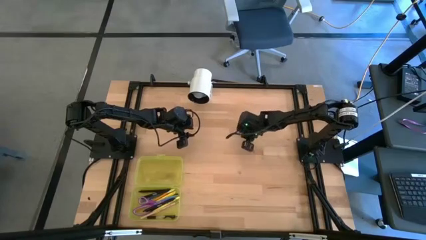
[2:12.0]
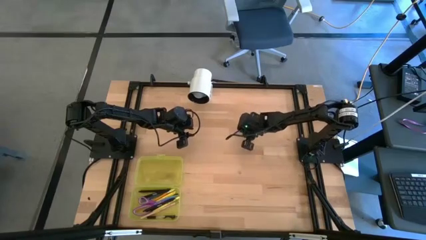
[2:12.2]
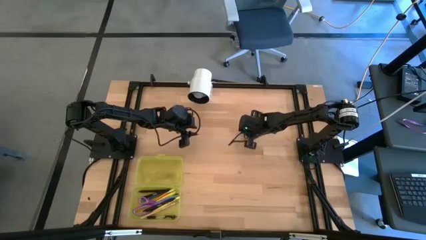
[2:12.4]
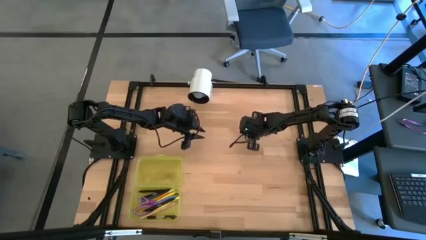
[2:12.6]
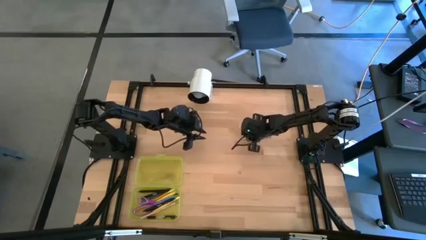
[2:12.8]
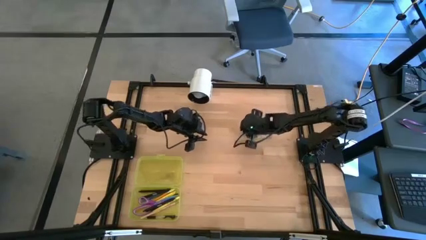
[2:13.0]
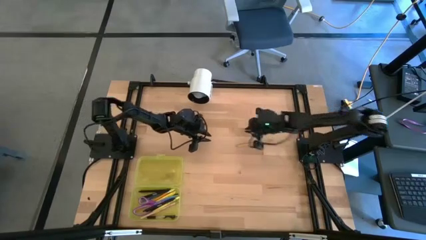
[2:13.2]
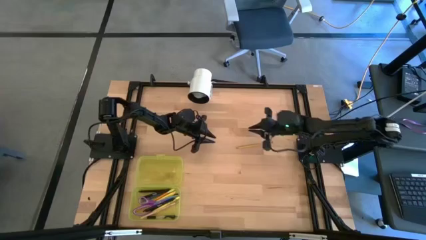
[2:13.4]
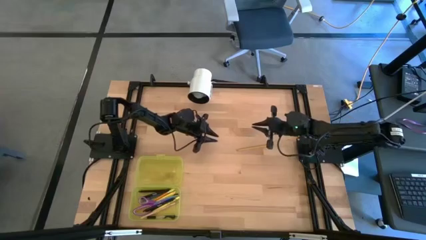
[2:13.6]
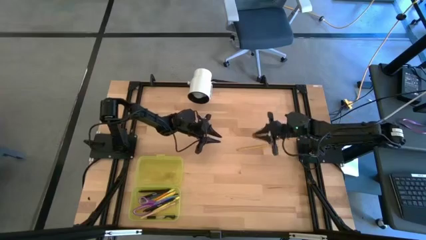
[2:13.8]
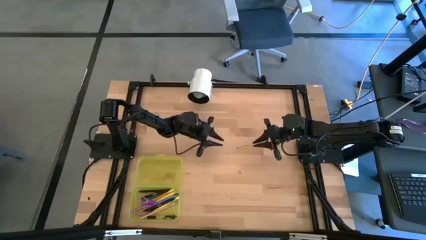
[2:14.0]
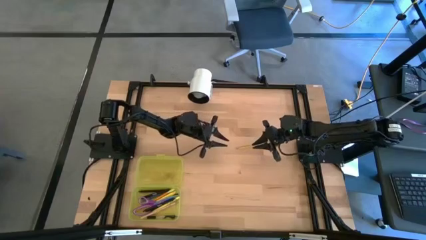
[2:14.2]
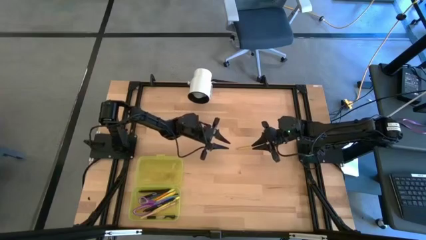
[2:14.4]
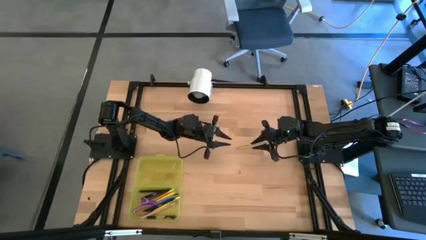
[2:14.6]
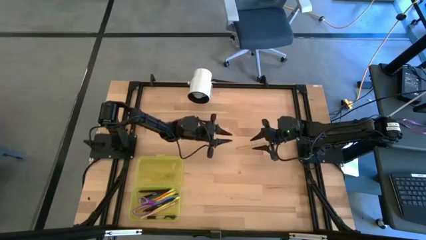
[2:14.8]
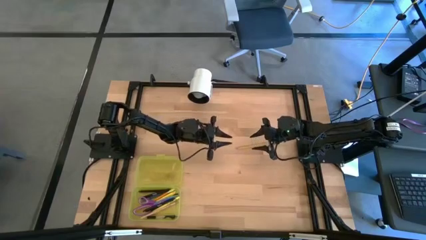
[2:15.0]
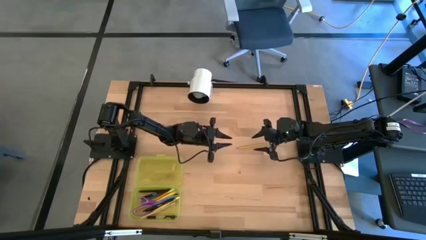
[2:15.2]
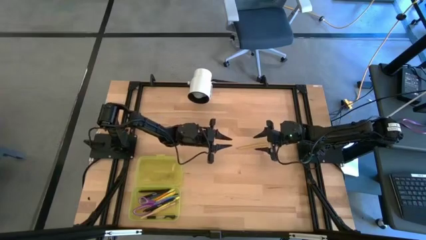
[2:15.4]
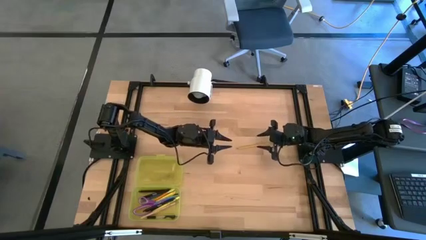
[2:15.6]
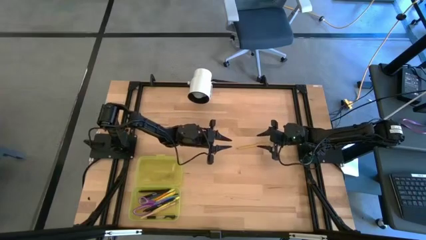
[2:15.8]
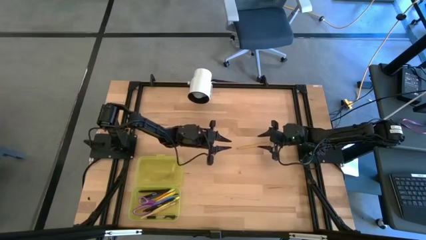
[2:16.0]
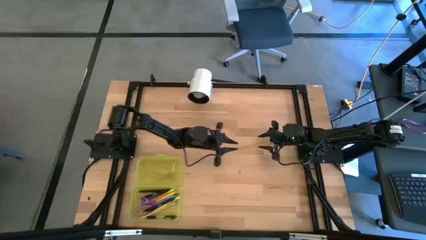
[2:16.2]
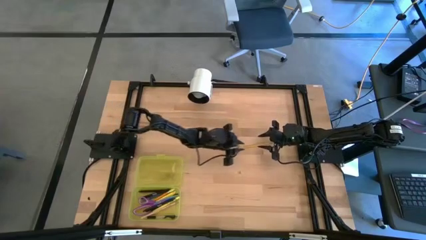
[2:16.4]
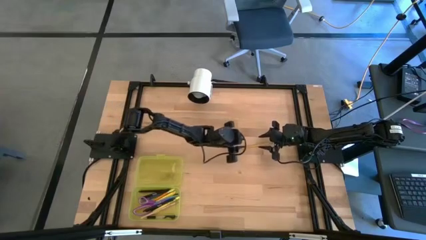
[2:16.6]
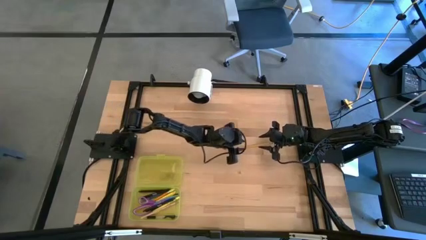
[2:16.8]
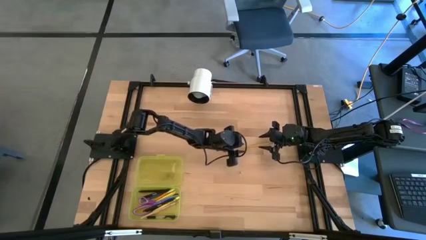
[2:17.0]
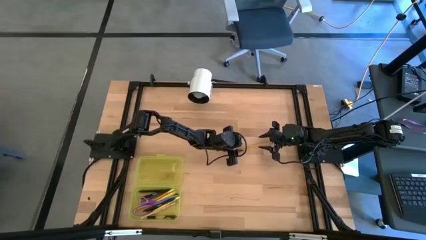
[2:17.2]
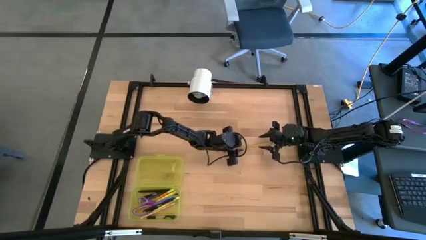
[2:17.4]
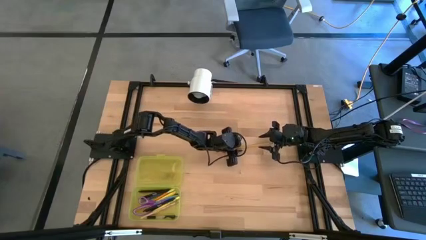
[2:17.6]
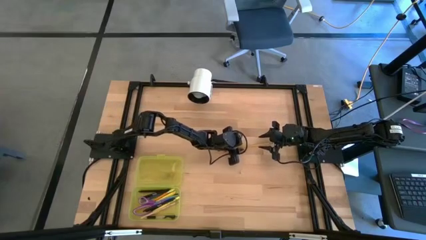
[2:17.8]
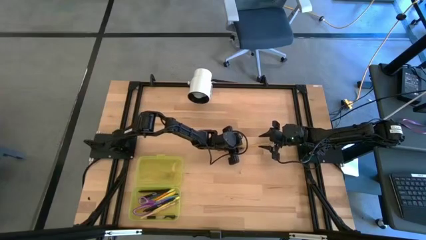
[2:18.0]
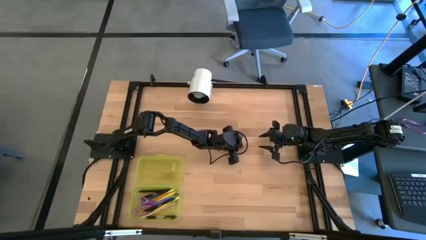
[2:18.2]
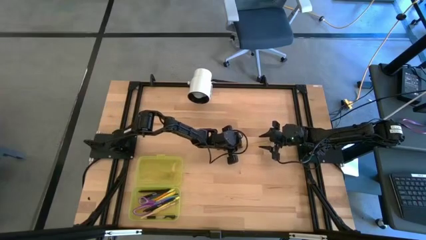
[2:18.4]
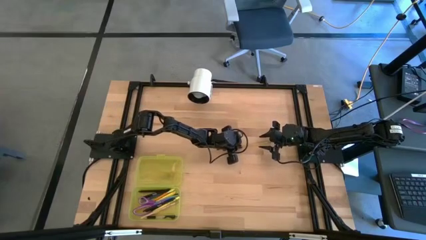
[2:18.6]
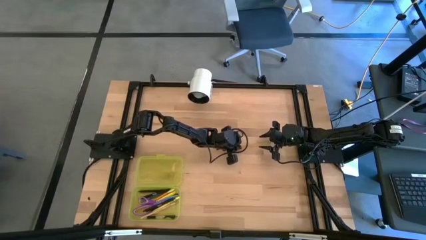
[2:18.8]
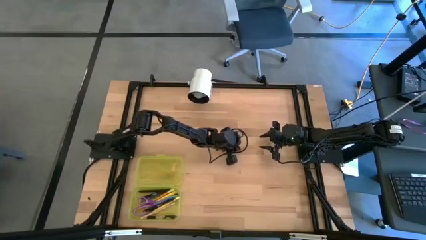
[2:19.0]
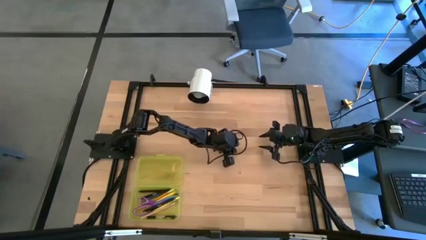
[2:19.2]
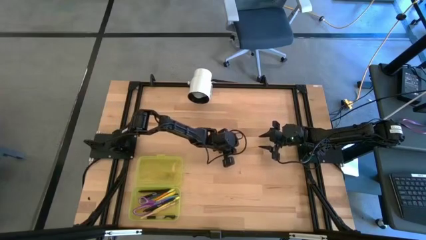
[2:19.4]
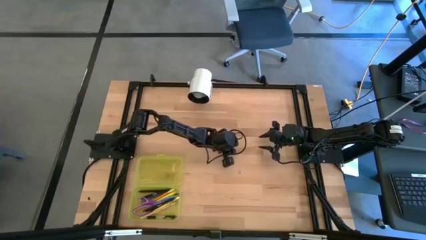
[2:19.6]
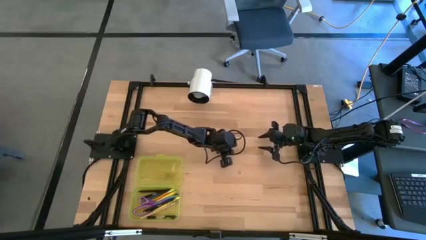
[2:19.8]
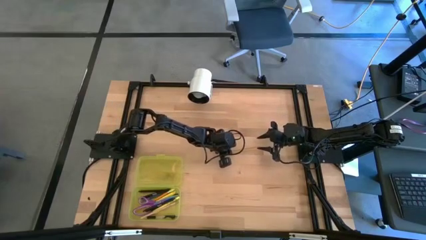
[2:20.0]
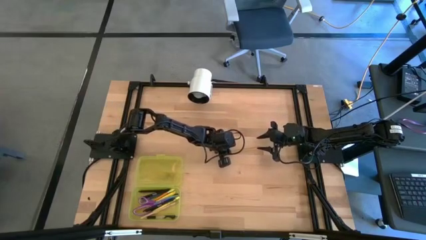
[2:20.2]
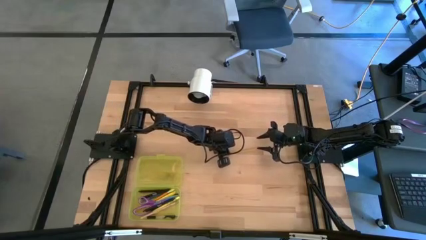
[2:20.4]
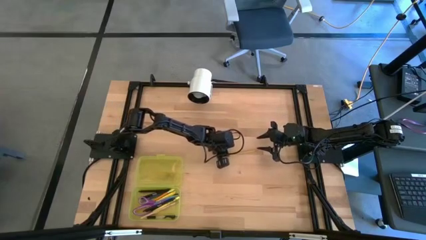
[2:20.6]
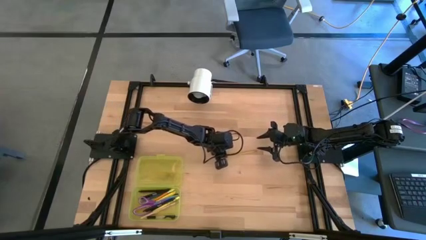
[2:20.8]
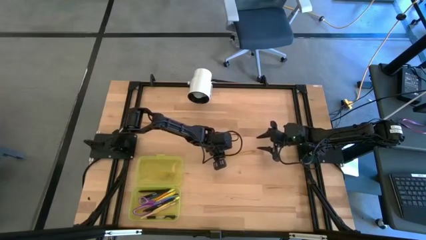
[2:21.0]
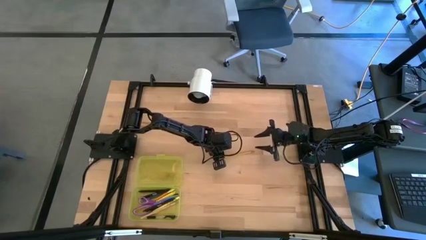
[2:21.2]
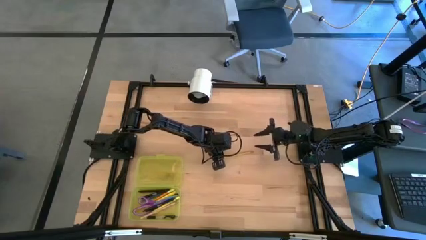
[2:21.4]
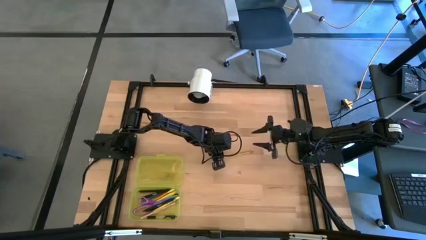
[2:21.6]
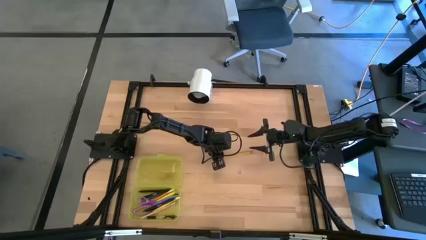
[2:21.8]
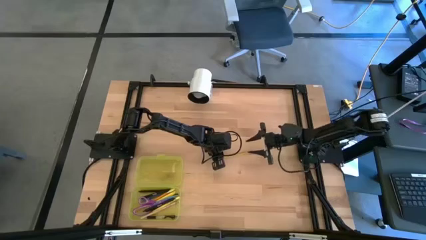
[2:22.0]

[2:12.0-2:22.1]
Task: Pick & place school supplies into a supply box
Put the yellow pencil into the yellow supply box

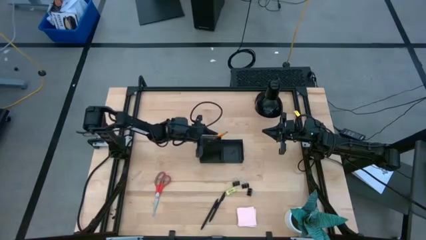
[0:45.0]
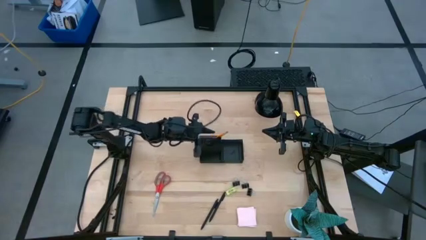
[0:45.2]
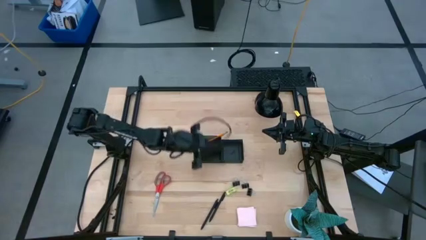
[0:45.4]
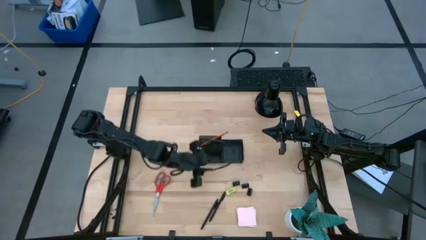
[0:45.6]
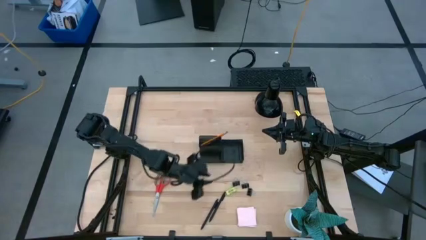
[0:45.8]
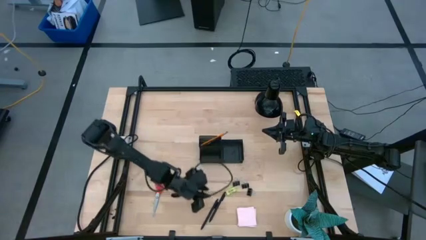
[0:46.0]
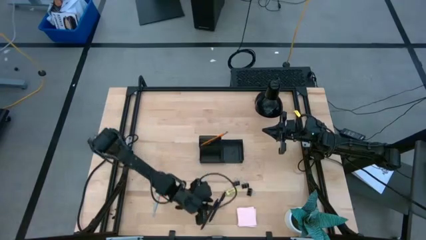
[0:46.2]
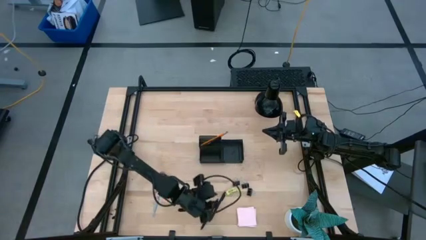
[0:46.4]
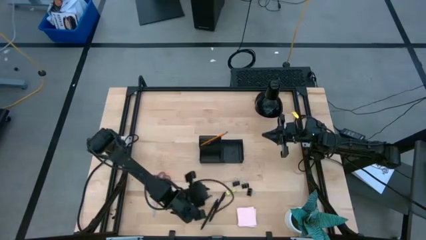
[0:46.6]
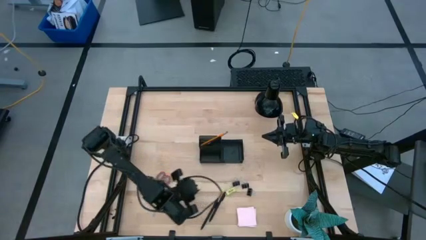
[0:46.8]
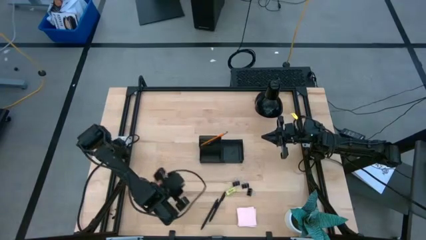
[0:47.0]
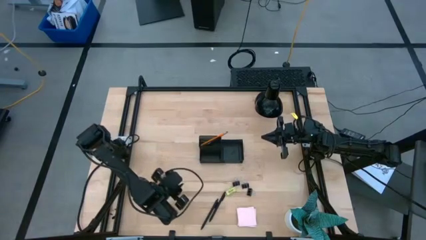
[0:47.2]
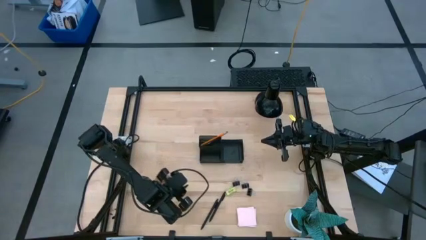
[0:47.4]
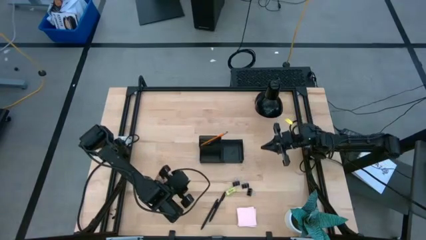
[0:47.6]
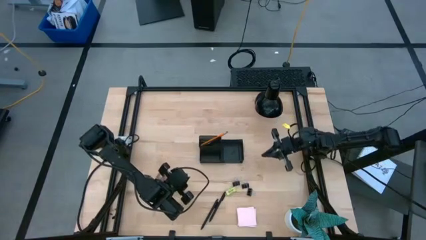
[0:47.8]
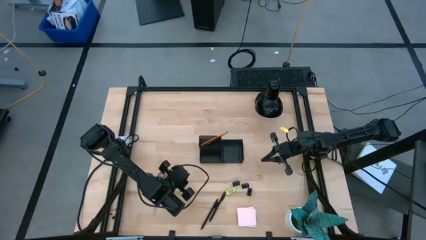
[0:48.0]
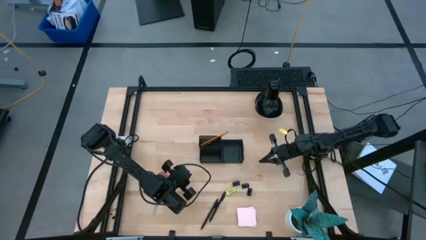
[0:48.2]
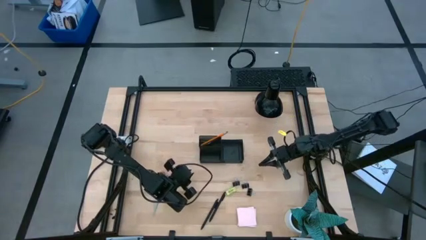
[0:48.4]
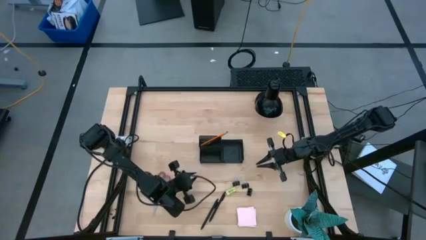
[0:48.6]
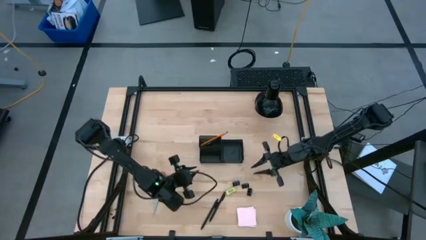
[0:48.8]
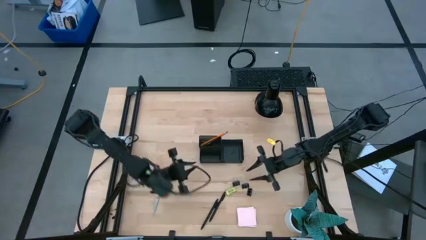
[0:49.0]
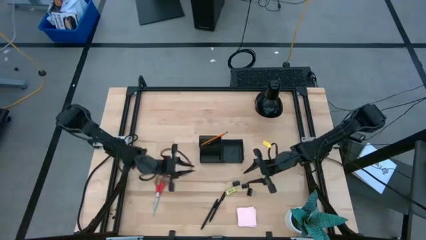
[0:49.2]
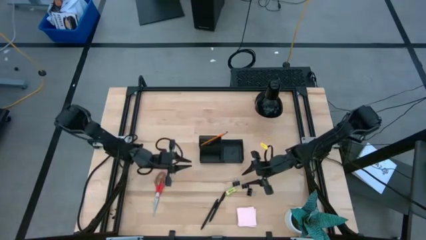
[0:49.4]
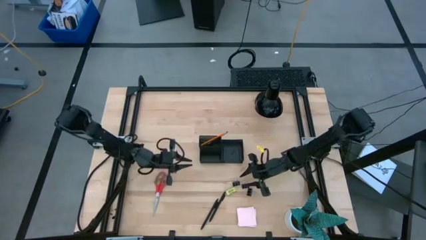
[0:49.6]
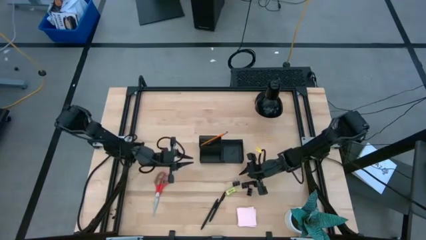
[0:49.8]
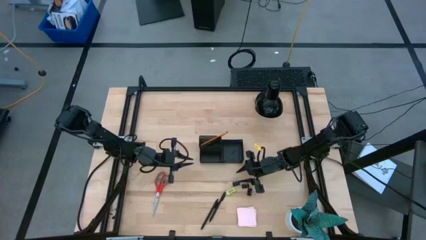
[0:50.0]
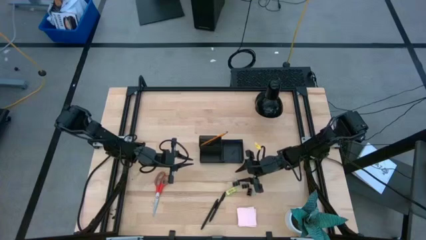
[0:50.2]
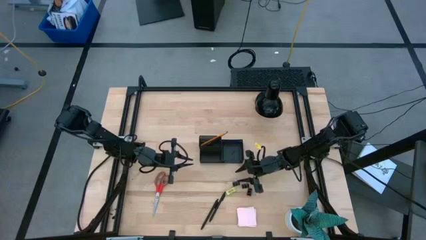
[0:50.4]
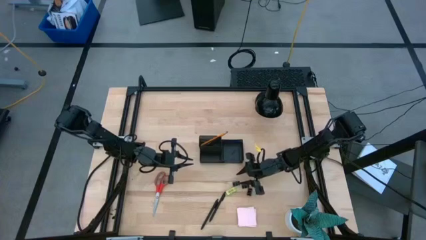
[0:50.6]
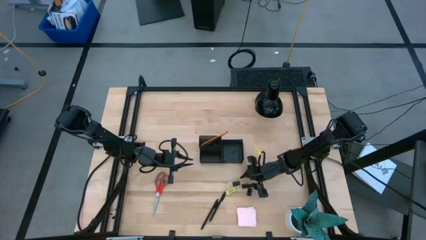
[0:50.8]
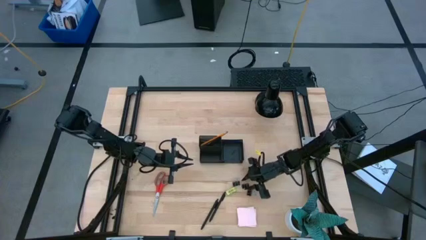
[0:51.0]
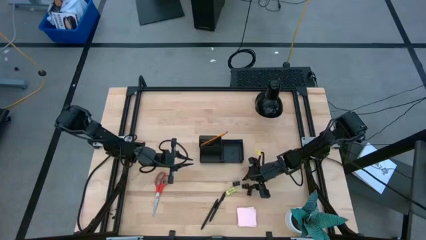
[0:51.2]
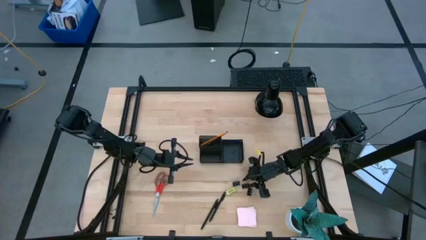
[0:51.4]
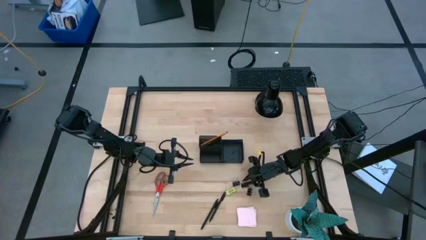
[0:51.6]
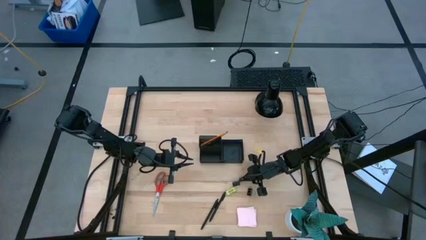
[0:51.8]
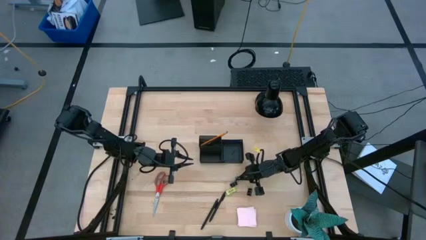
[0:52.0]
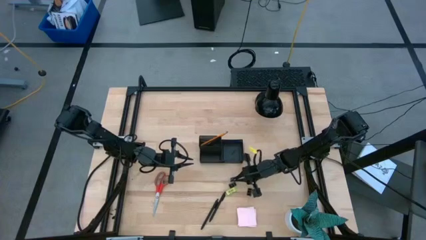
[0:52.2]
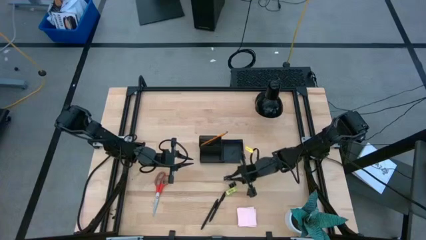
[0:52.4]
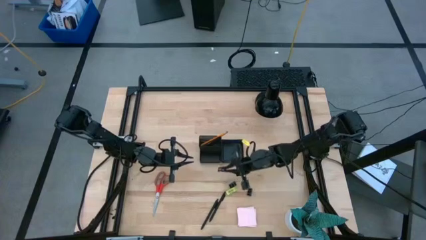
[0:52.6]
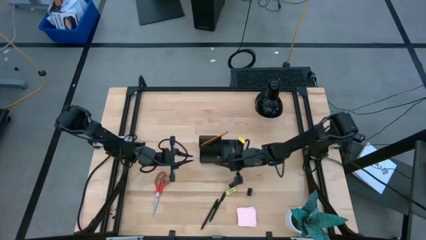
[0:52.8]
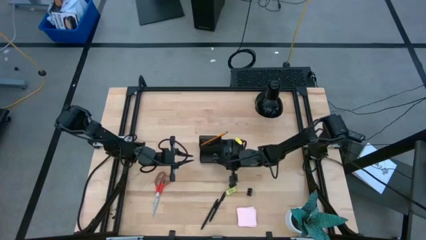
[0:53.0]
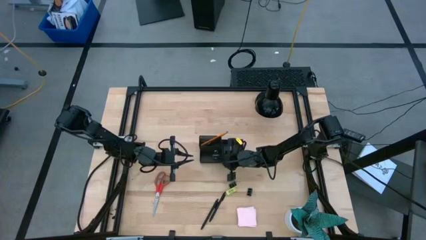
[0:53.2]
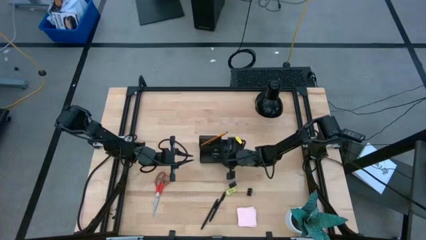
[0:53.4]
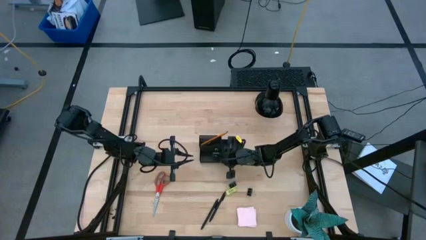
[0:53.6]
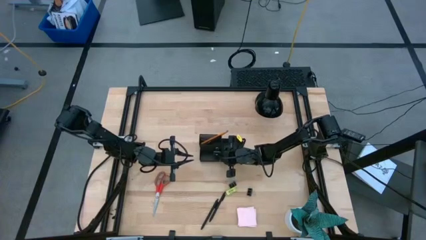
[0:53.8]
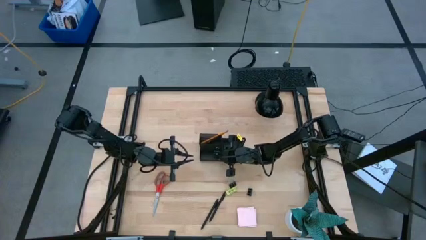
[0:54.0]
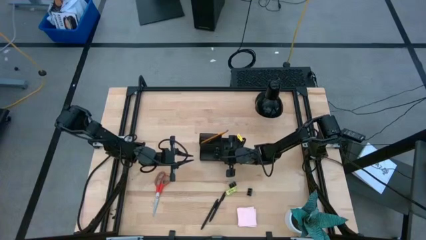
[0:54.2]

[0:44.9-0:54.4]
Task: Pick and place office supplies into organizer
Put the black binder clip into the black desk organizer
